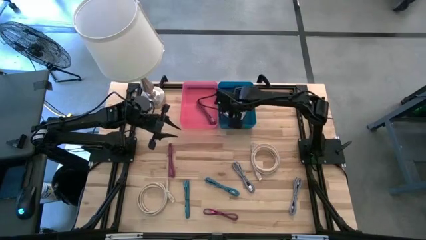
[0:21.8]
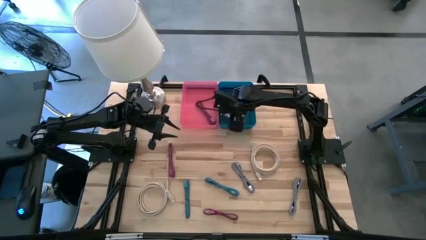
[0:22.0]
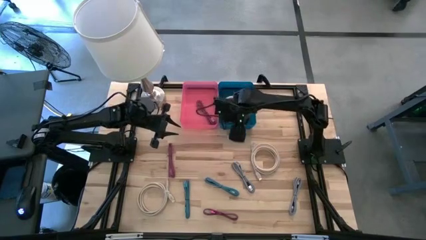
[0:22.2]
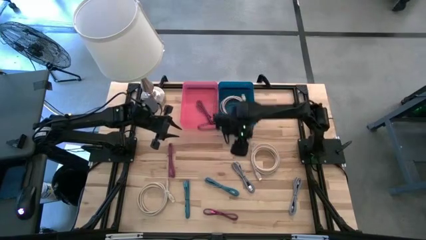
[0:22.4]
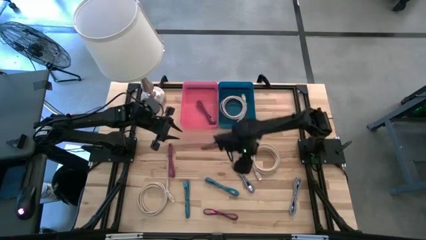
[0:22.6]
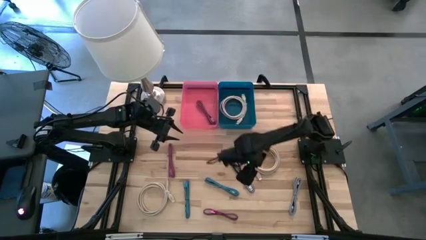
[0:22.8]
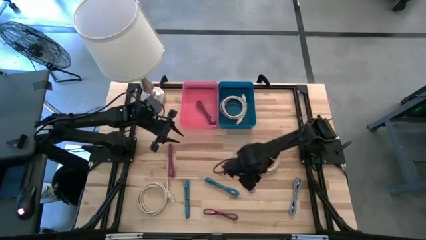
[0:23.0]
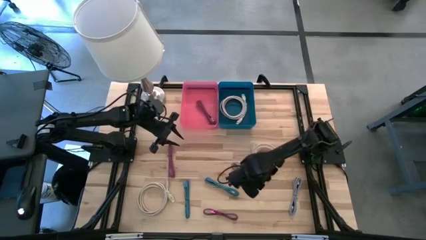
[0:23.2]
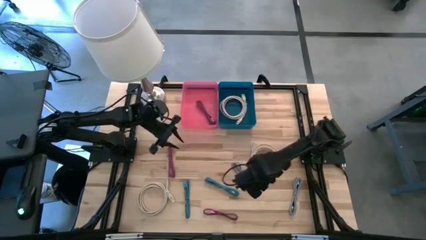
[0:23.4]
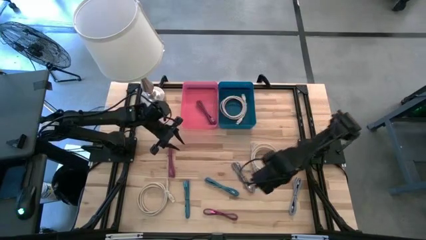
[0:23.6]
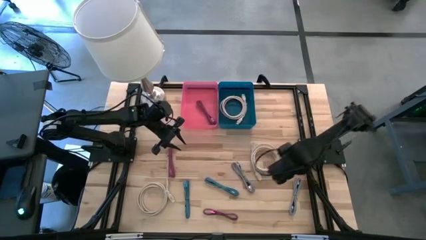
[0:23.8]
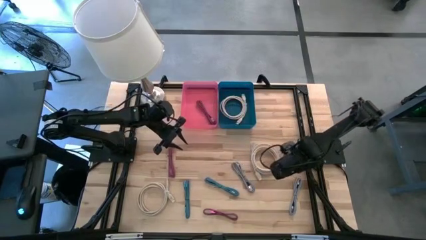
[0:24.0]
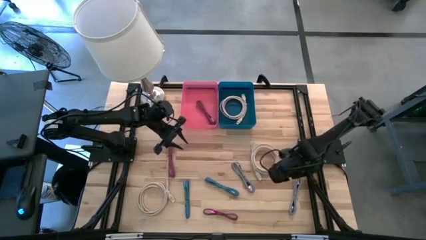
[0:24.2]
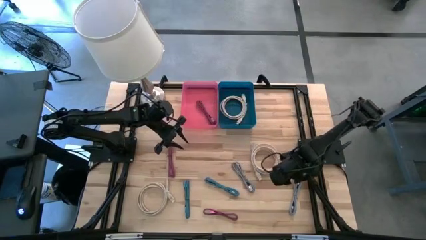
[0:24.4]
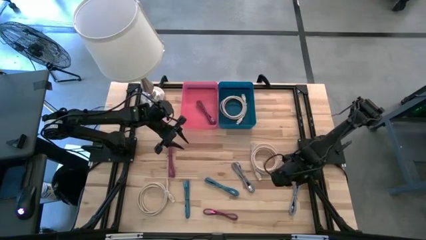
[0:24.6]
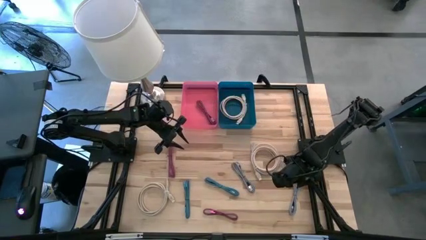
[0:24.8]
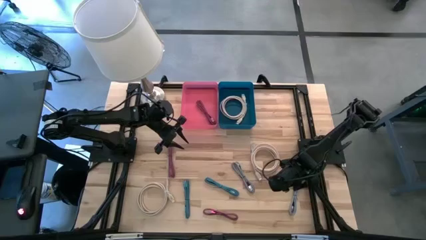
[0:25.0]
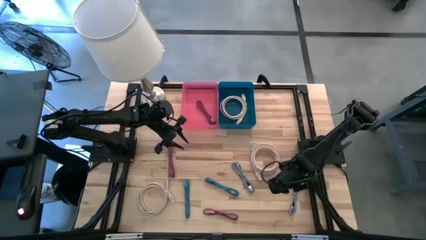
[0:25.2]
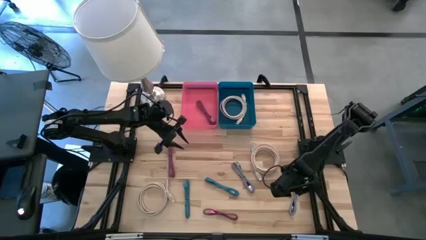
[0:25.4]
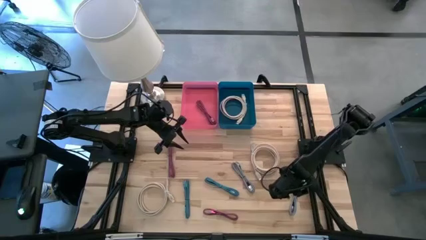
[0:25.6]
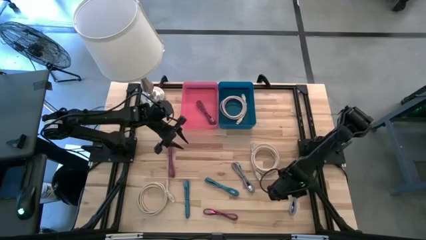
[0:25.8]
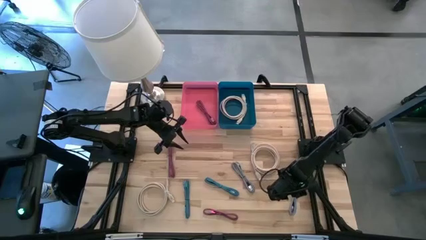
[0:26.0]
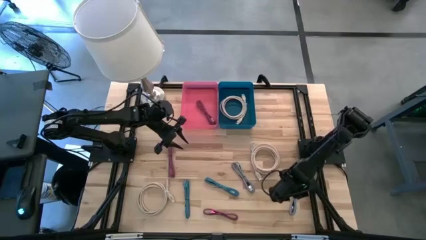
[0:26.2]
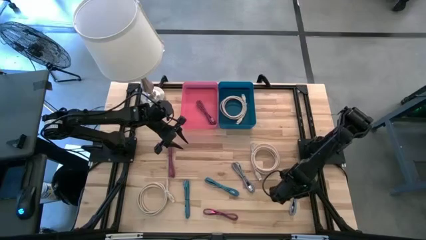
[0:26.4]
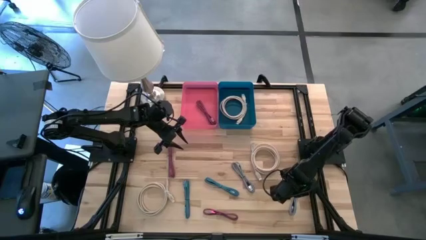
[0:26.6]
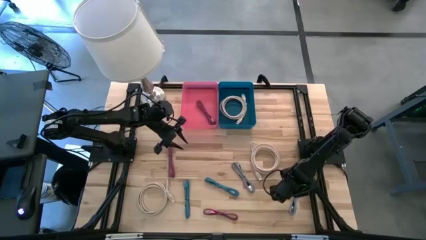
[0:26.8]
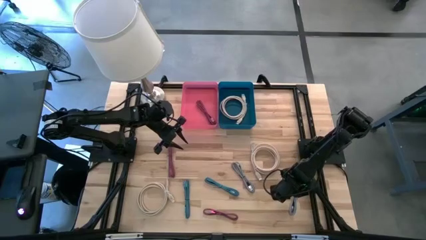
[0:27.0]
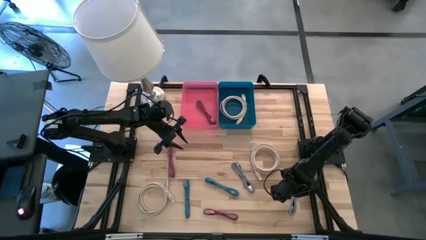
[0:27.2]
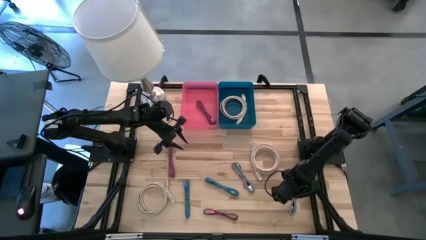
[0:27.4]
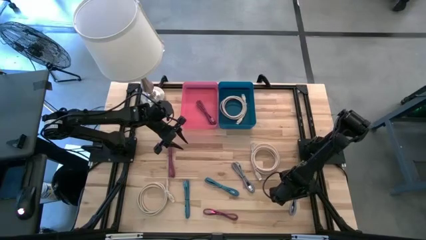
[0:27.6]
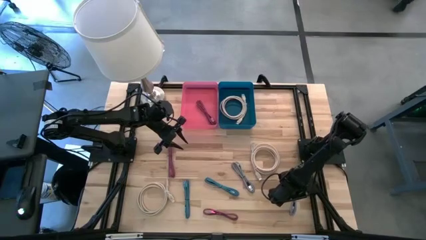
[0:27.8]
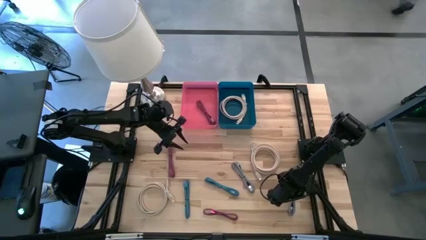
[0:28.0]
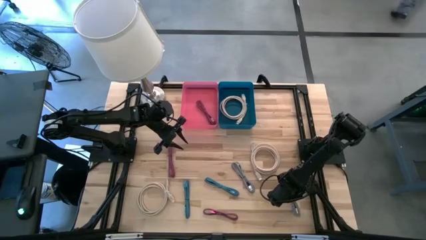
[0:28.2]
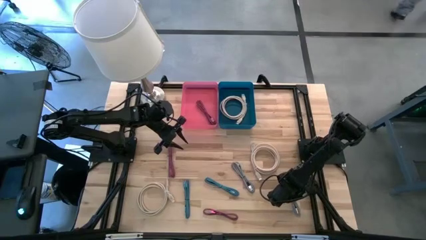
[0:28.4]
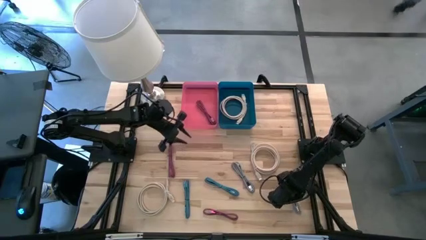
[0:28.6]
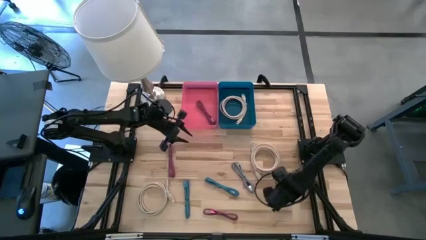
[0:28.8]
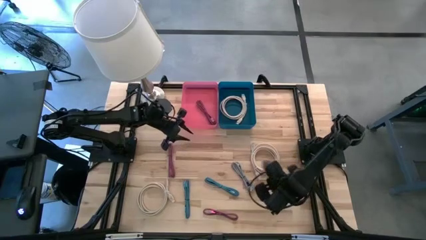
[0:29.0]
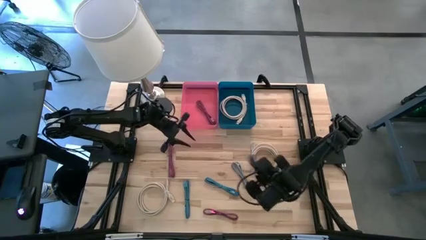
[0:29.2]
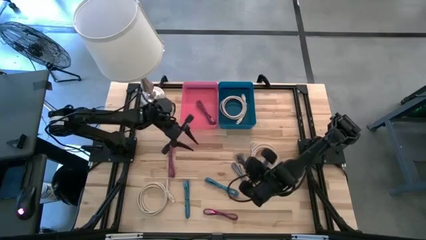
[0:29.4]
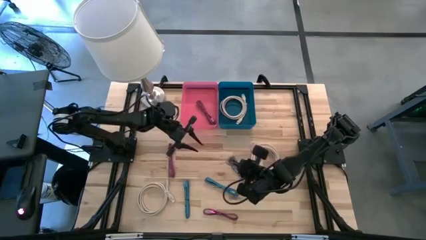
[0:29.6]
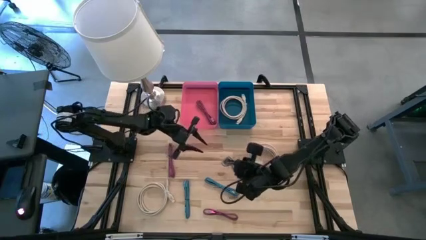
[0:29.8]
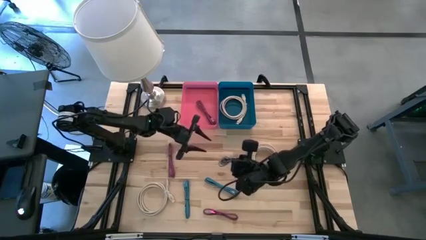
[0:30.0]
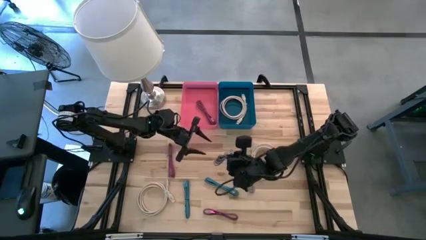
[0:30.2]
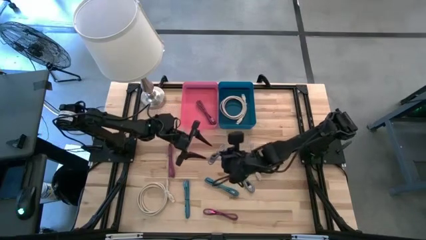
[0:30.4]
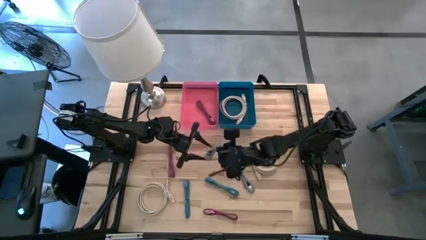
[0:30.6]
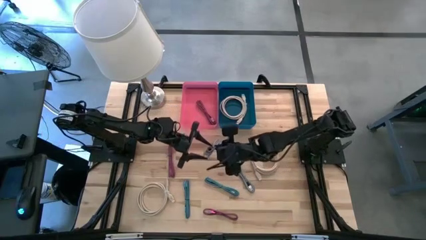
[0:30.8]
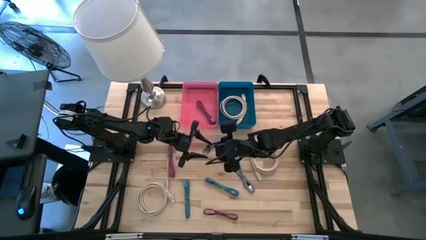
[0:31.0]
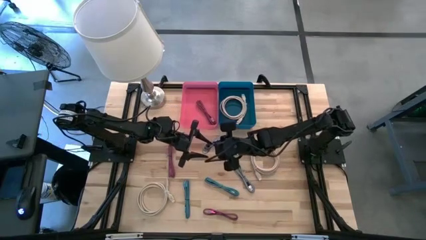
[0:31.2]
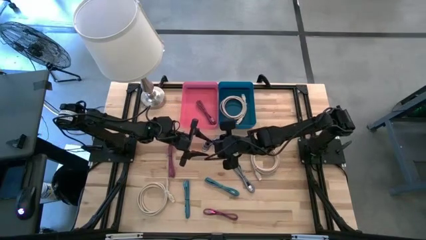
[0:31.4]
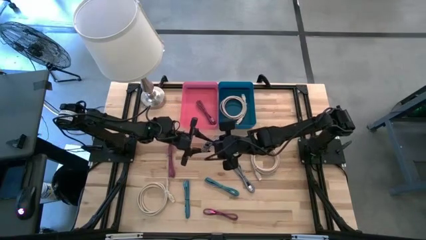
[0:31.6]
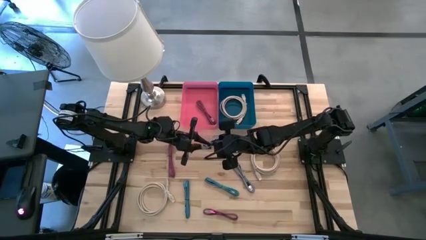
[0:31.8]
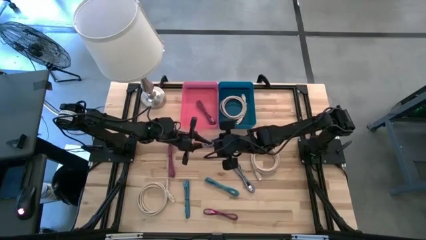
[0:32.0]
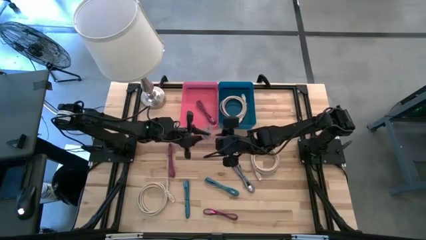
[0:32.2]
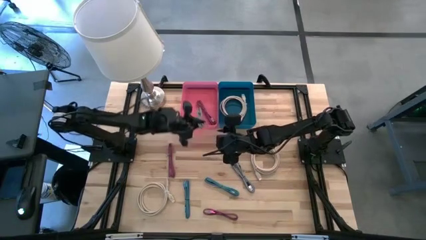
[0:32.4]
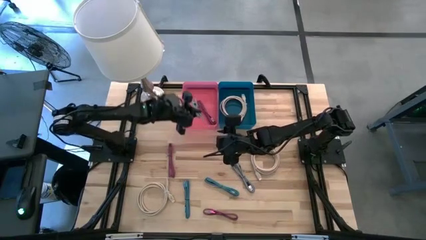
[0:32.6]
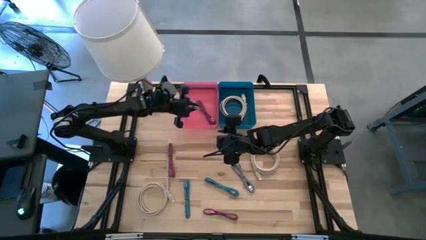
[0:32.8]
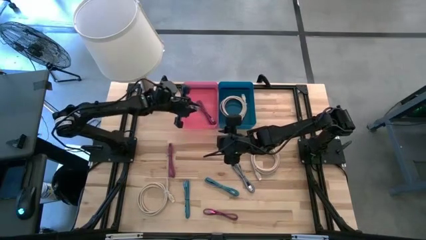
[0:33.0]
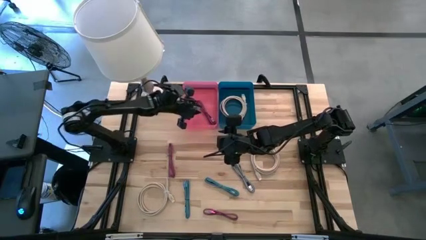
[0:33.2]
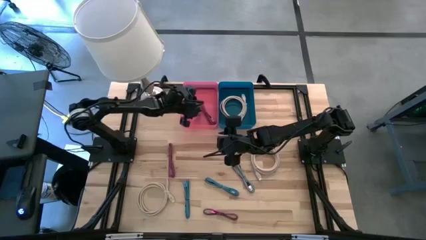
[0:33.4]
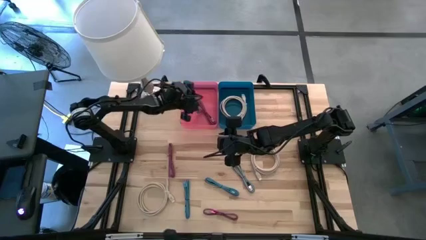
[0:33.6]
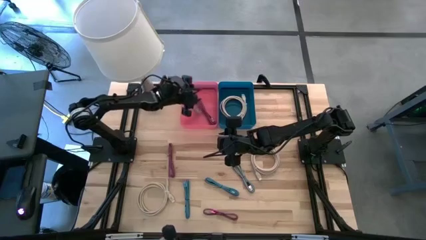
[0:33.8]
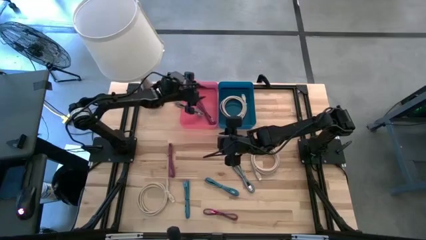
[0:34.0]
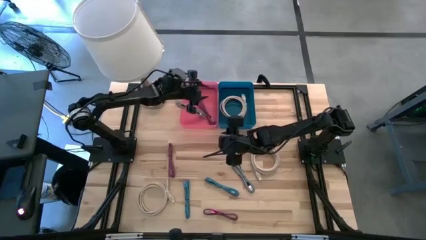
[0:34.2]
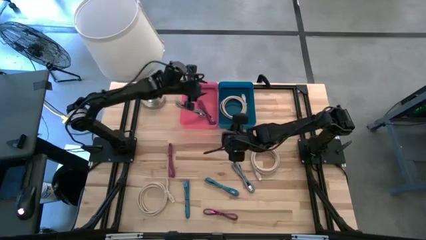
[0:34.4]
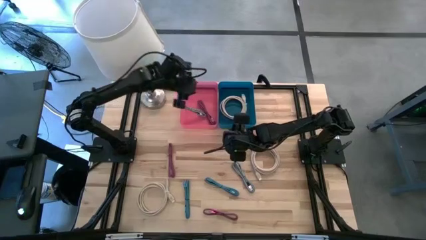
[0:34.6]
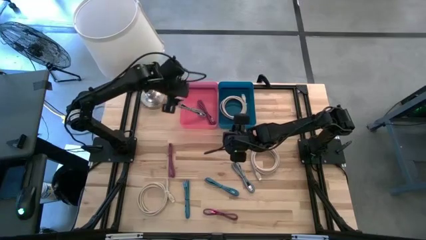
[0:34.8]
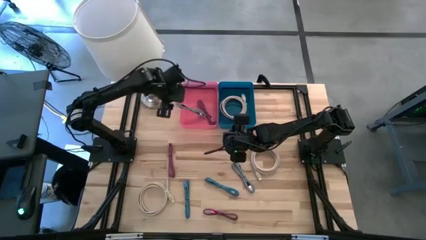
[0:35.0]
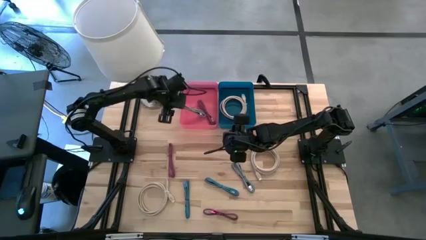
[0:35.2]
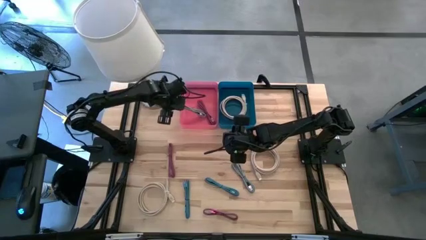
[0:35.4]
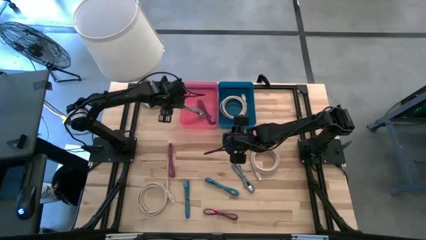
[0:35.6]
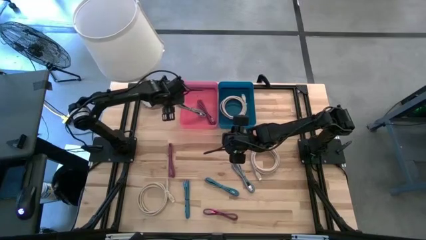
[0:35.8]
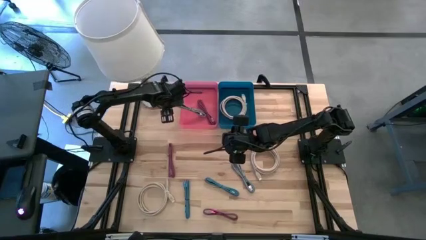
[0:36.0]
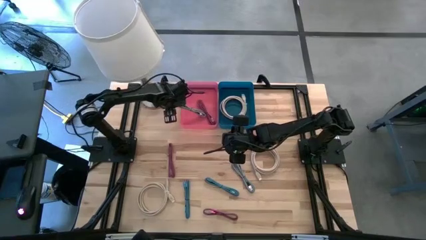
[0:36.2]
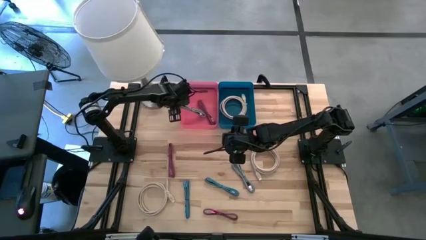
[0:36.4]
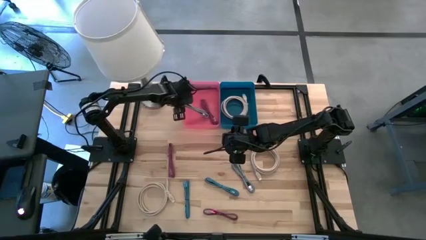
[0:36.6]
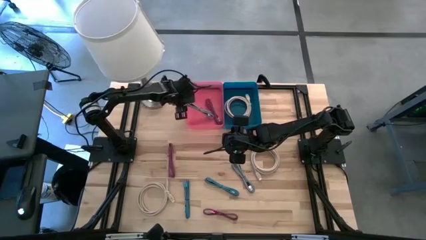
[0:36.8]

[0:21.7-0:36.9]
Task: Pick & Place USB Port
Put the right black white charger cable into the pink bin
